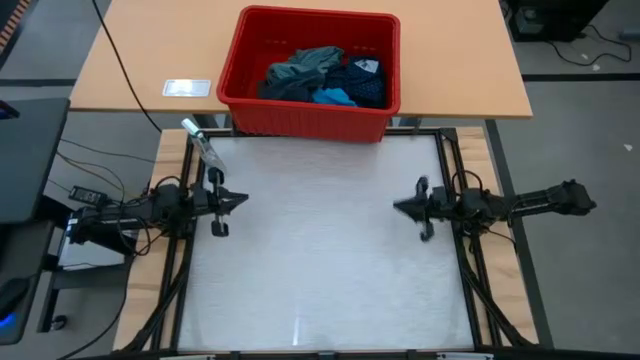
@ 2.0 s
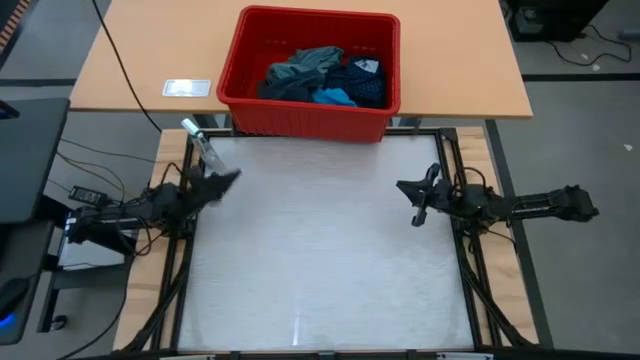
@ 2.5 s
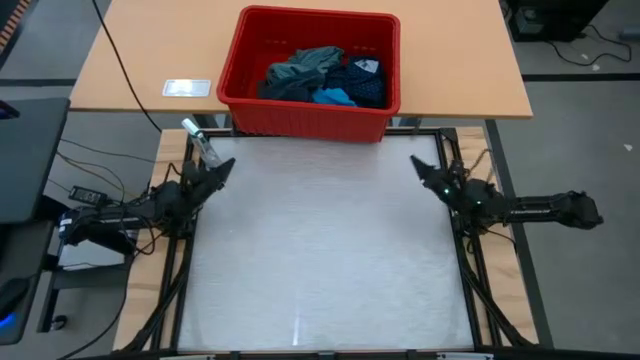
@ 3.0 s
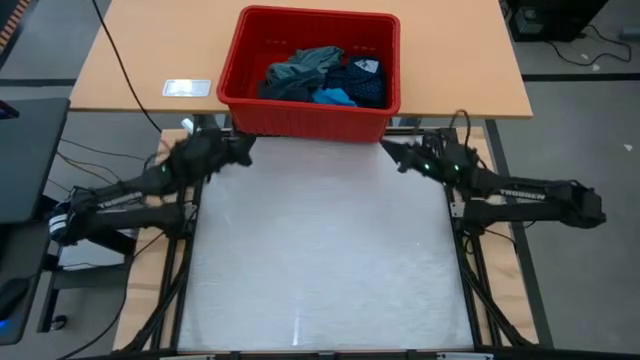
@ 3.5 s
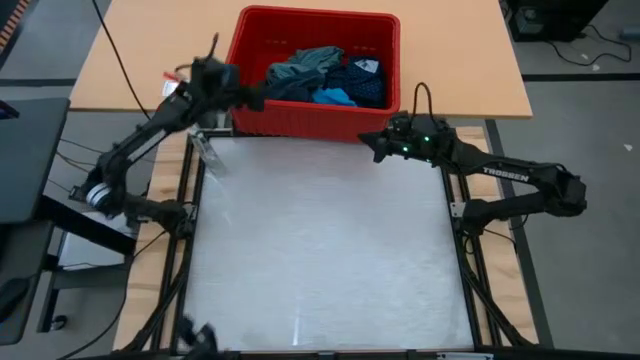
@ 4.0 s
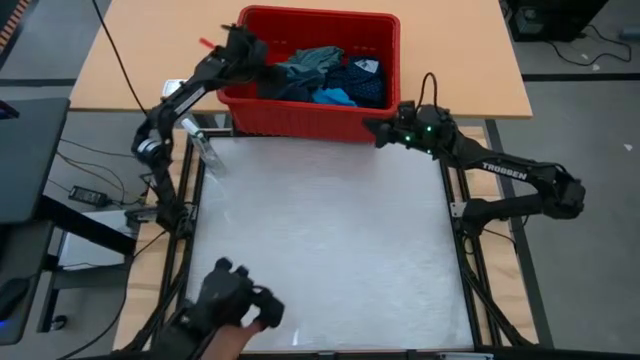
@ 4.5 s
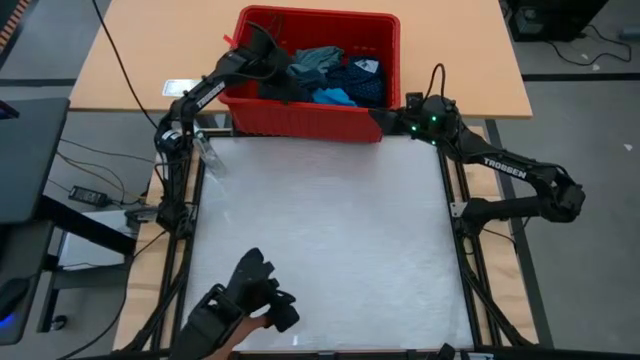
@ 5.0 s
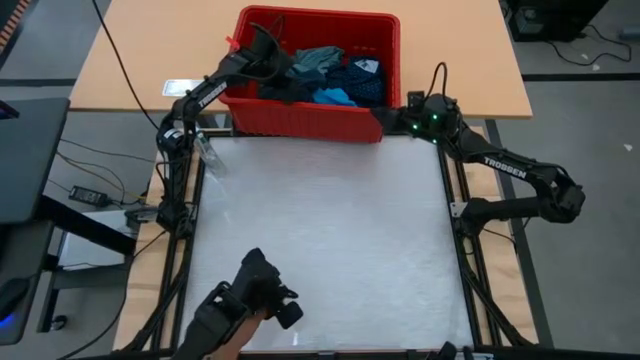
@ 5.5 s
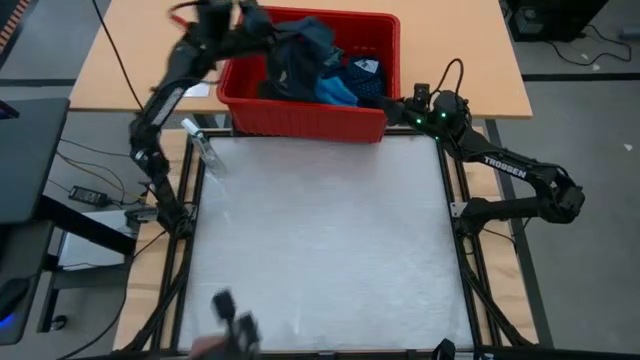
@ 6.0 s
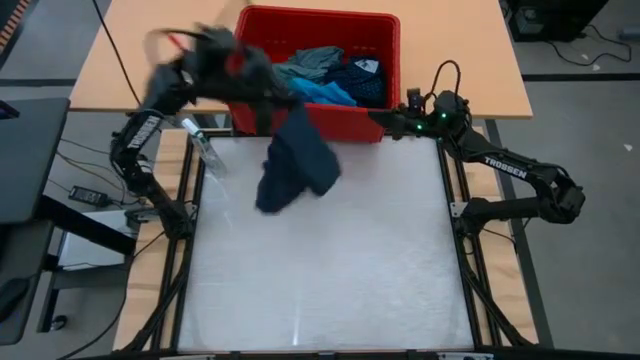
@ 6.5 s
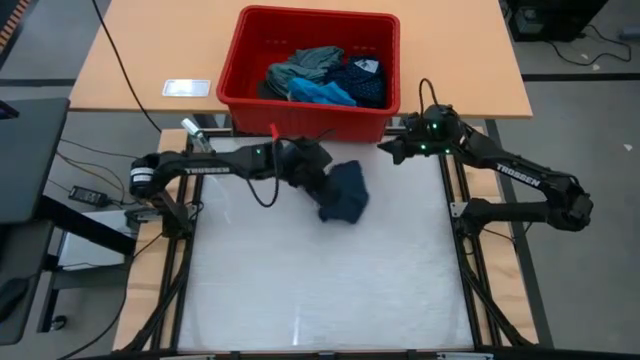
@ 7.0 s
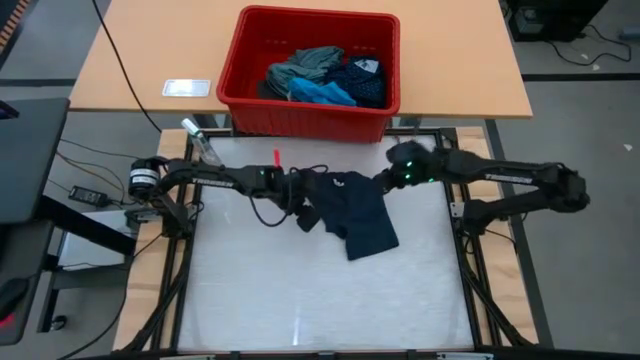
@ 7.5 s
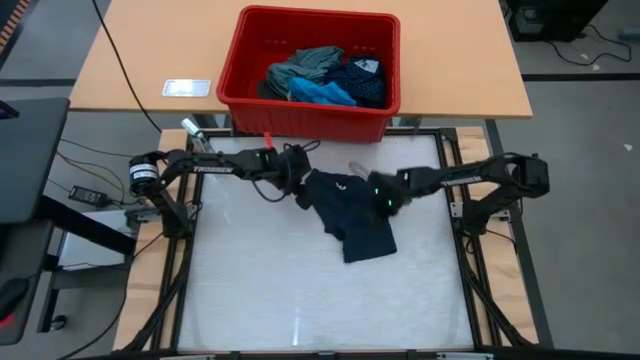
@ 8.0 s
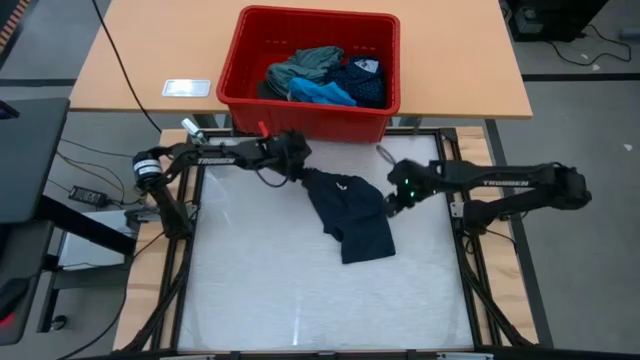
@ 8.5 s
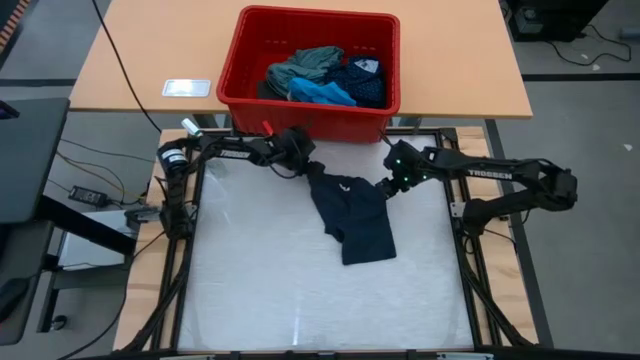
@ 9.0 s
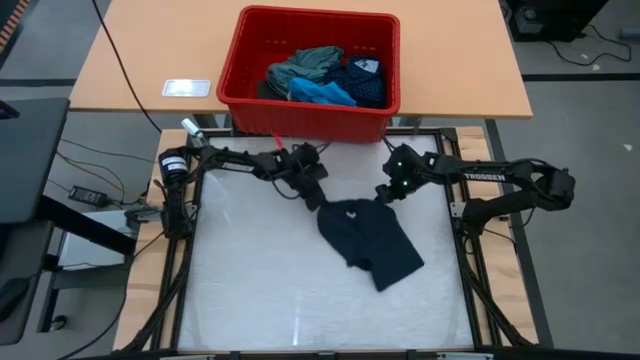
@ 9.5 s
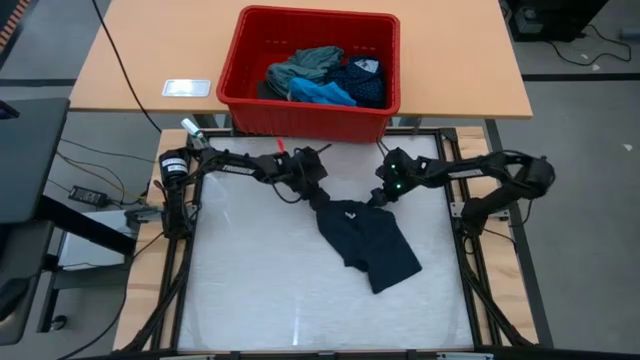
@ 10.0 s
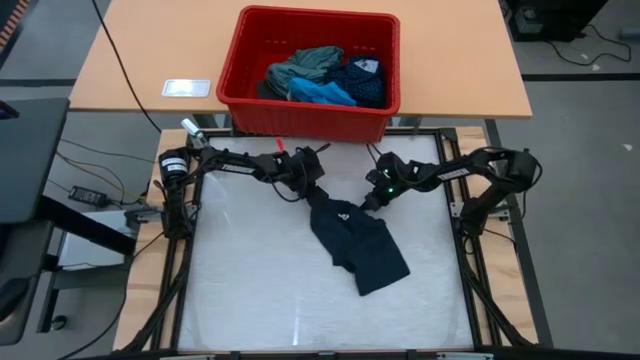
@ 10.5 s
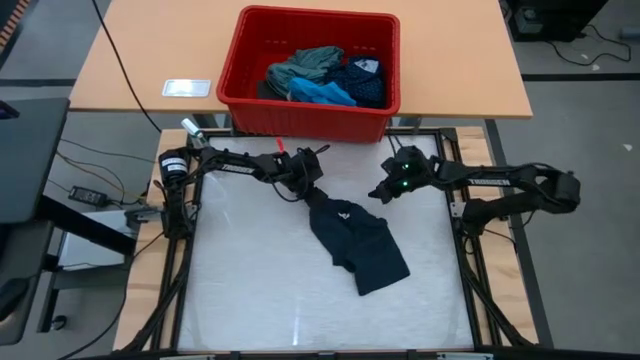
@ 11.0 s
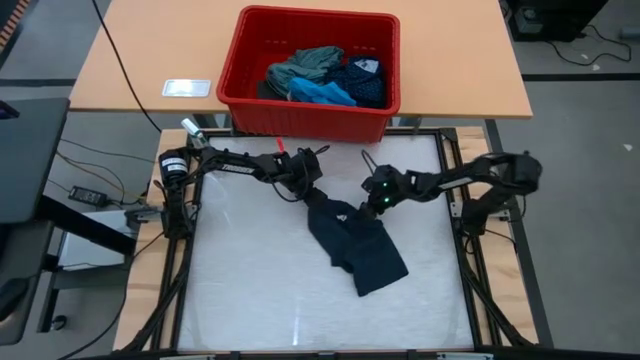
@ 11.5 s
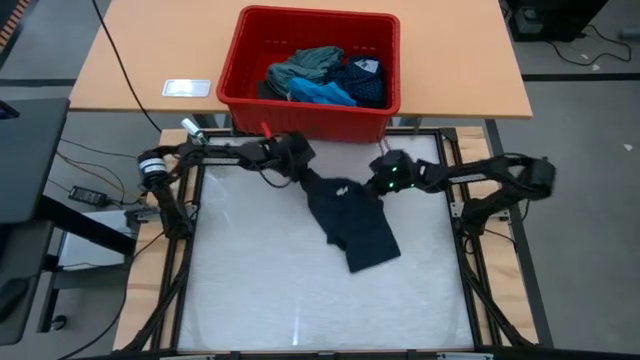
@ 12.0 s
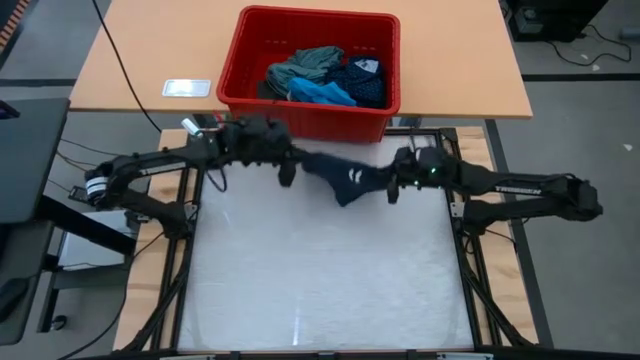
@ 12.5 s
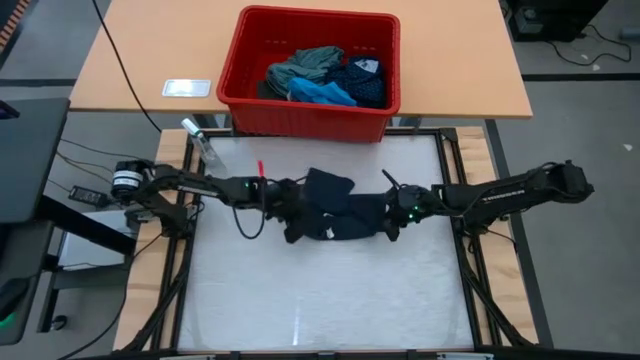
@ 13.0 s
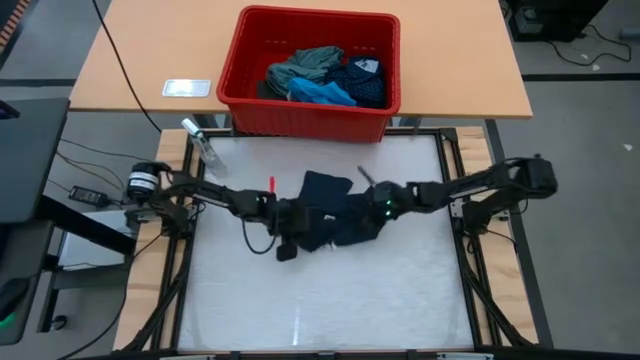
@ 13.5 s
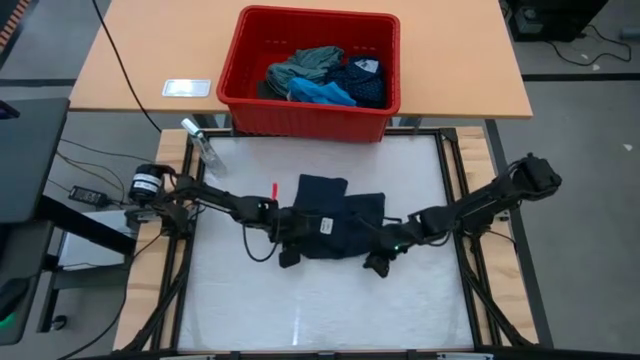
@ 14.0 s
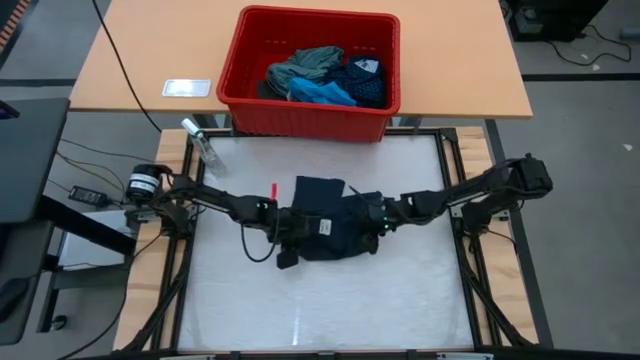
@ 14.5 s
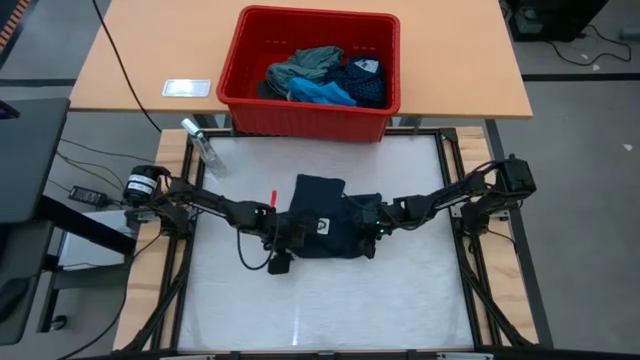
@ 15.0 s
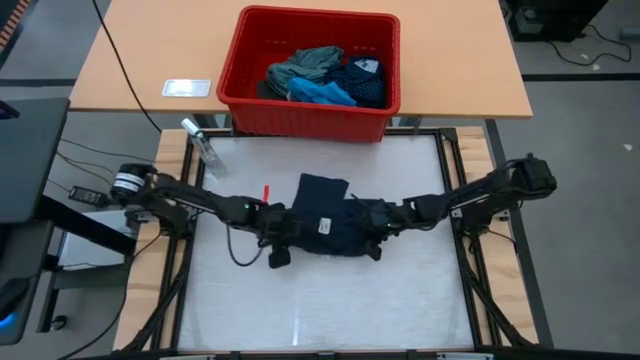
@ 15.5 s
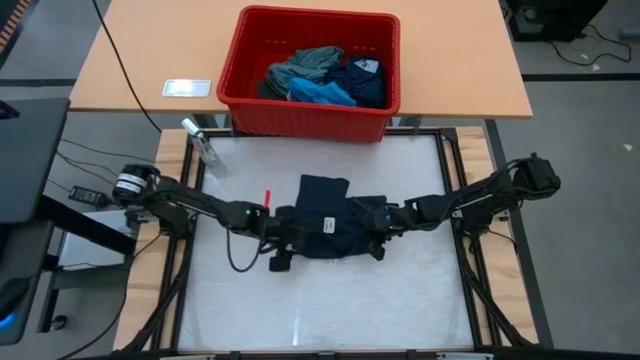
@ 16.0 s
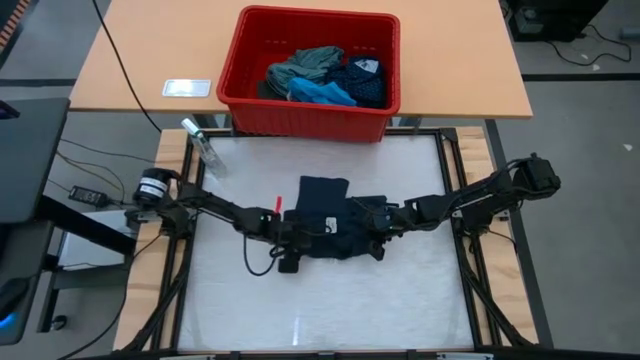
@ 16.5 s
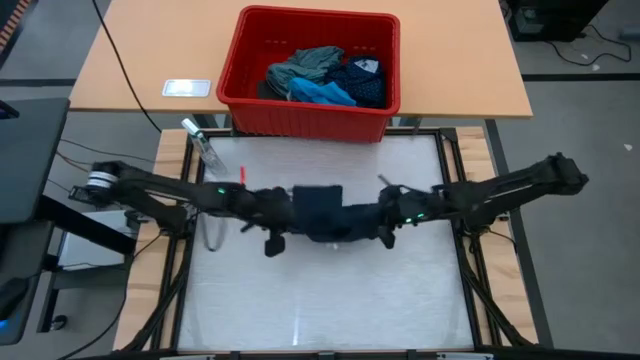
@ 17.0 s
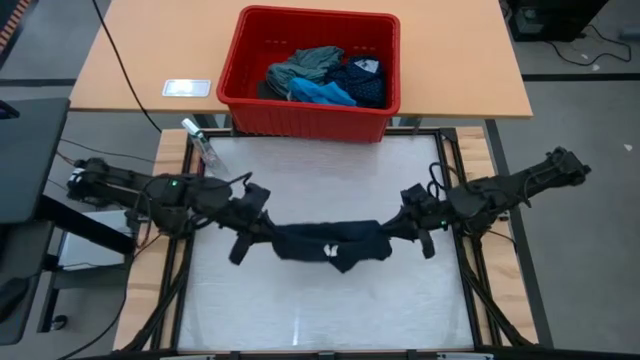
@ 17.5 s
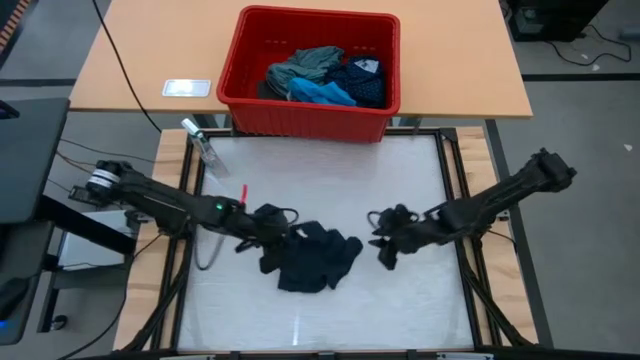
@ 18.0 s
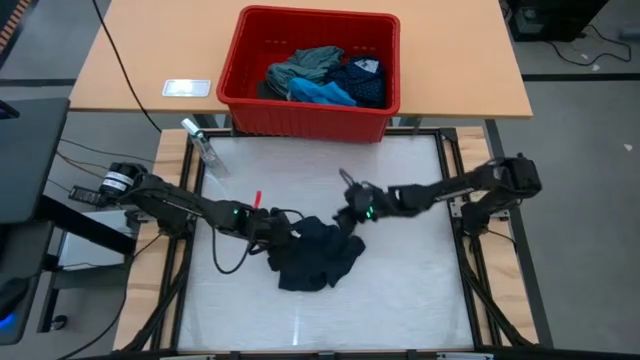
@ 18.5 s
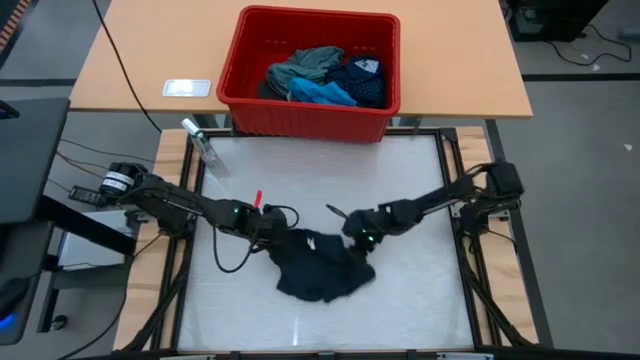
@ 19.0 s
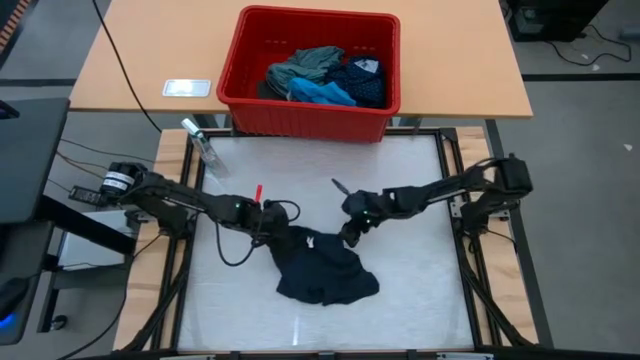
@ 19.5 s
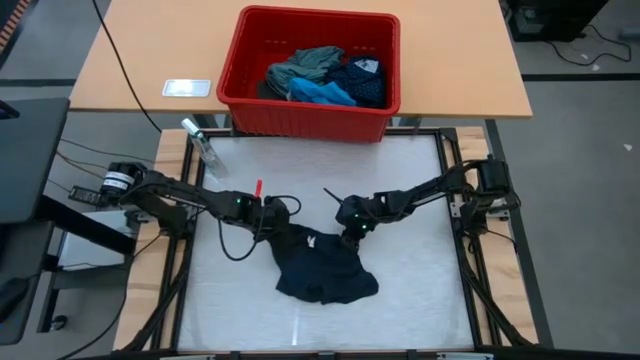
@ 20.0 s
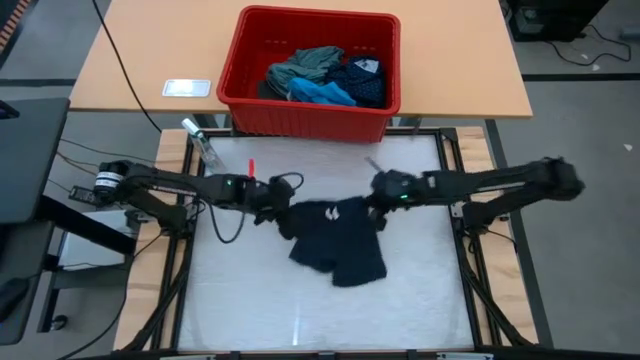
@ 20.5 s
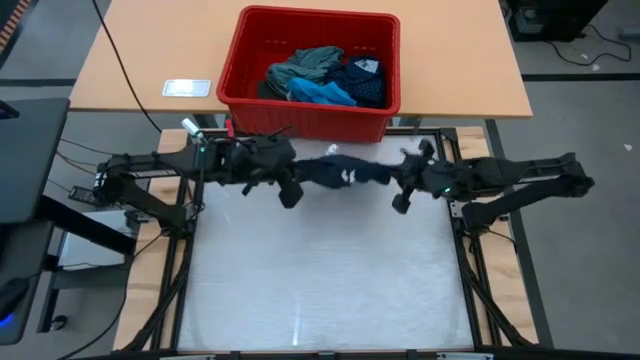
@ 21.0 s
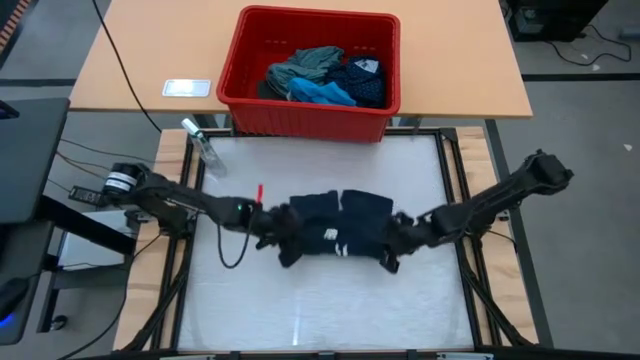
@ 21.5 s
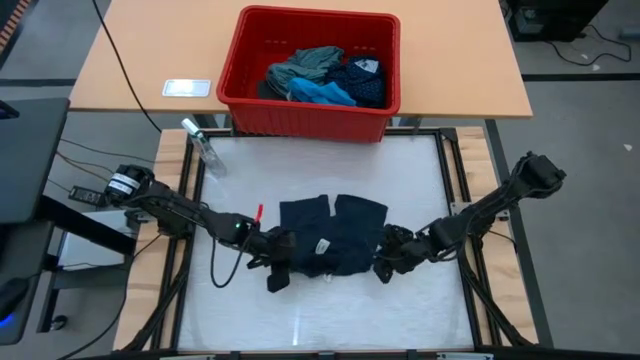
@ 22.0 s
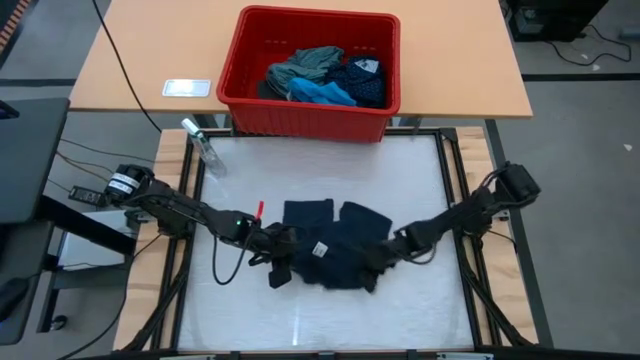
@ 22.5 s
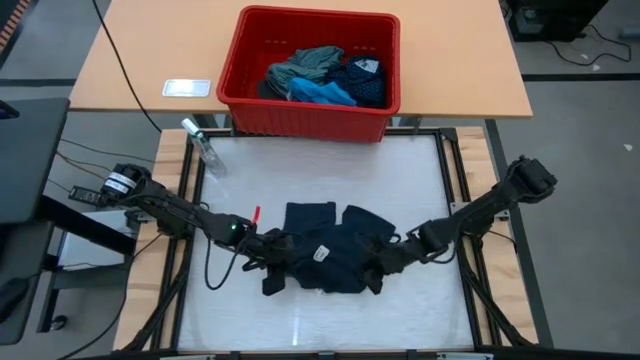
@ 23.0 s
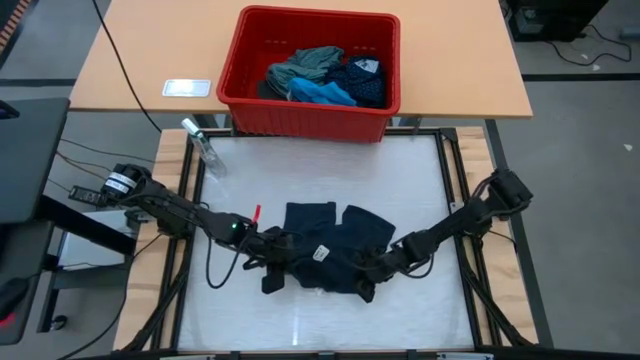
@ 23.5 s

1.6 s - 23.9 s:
Task: Fold laundry
Fold the dark blue shorts
